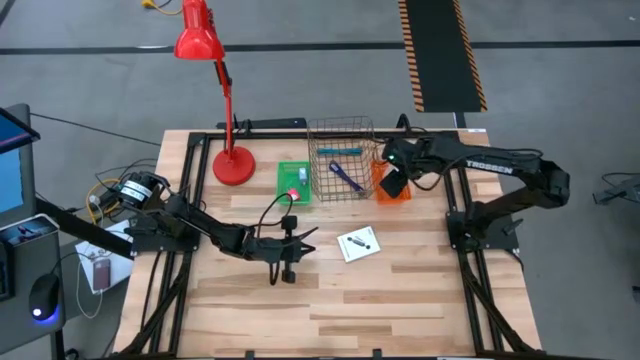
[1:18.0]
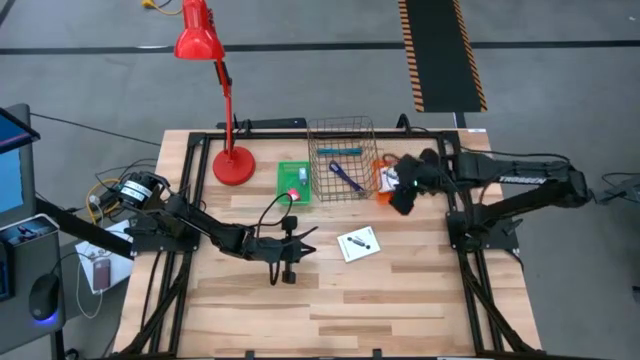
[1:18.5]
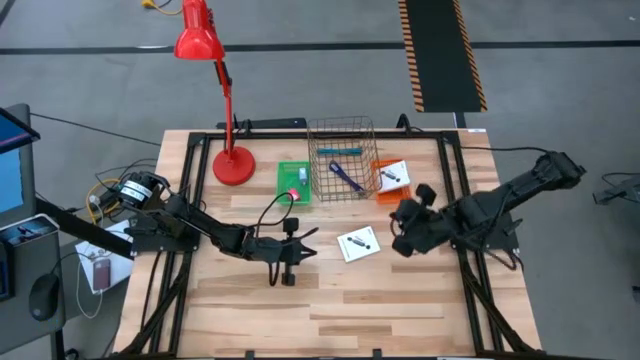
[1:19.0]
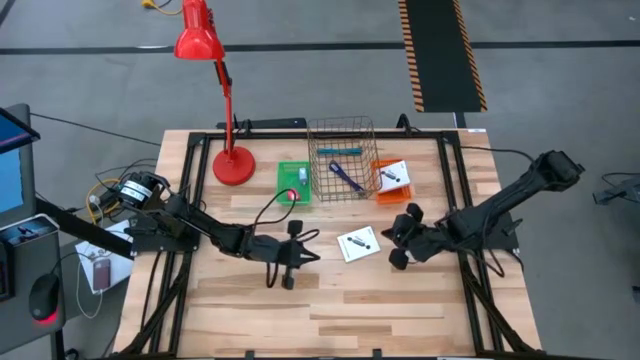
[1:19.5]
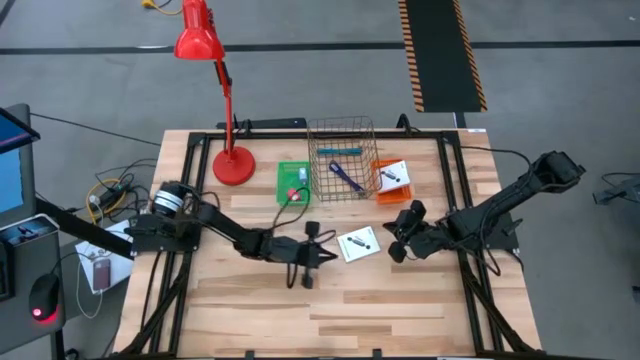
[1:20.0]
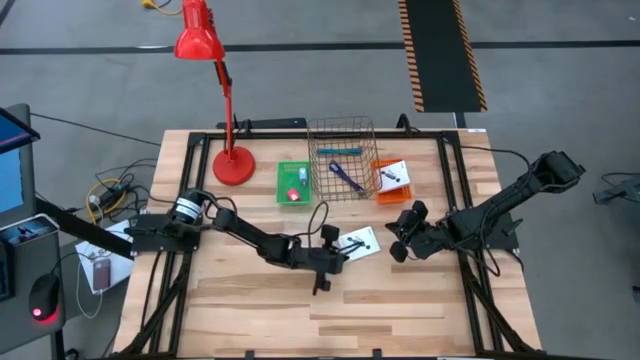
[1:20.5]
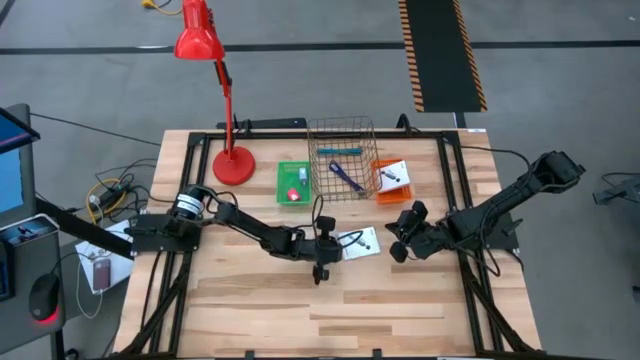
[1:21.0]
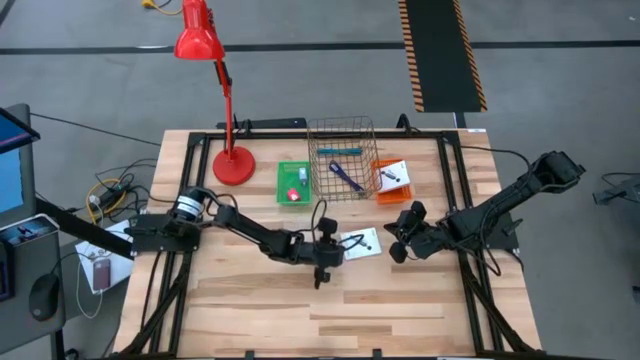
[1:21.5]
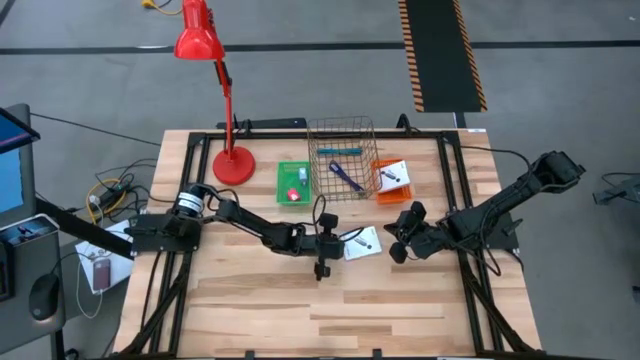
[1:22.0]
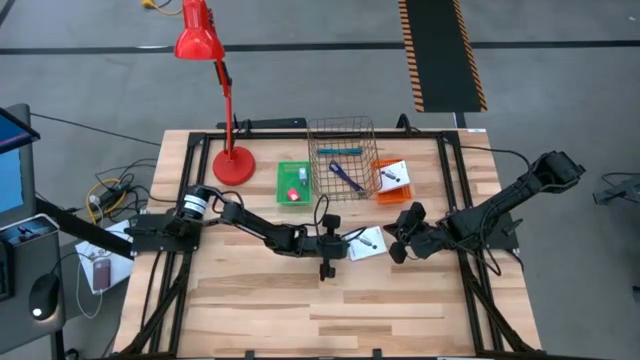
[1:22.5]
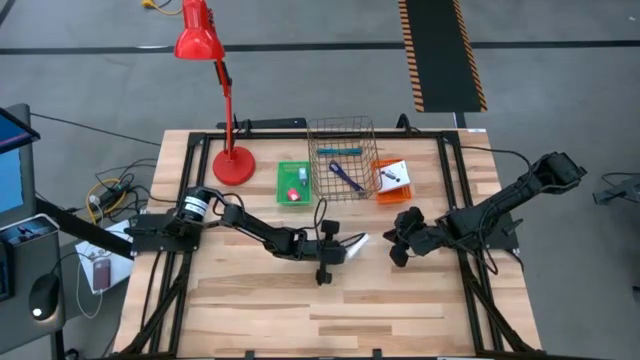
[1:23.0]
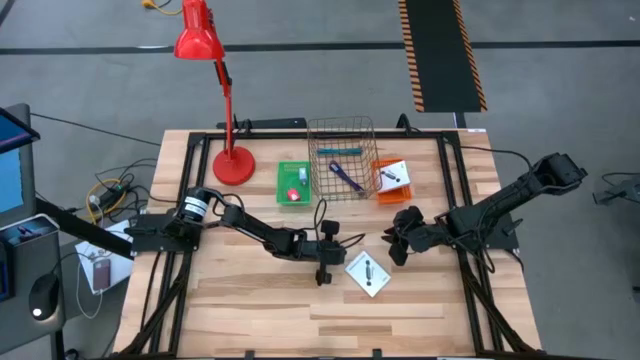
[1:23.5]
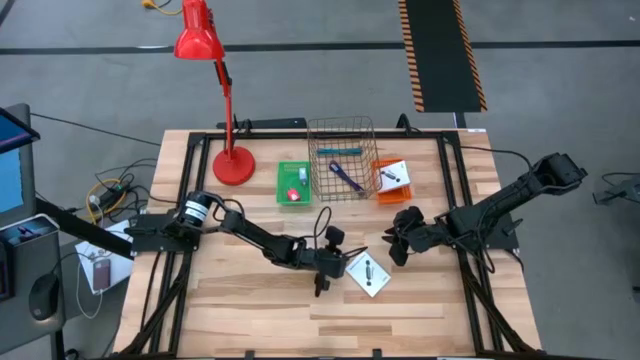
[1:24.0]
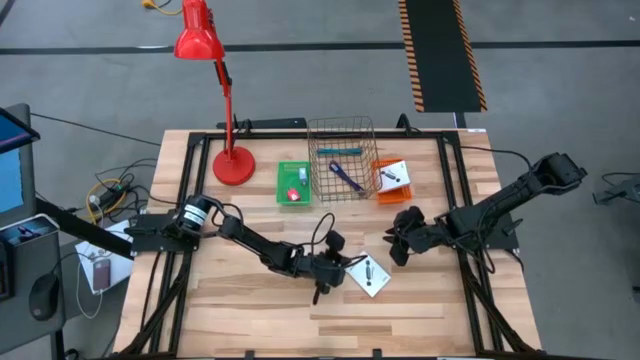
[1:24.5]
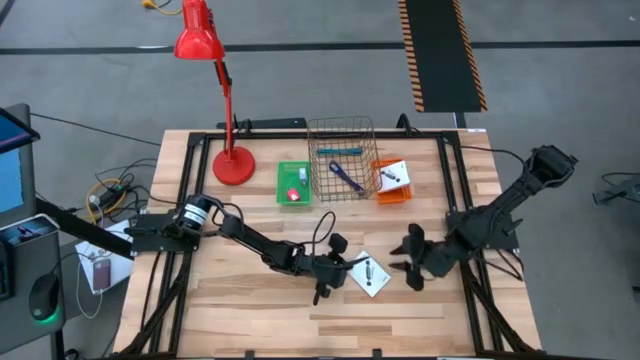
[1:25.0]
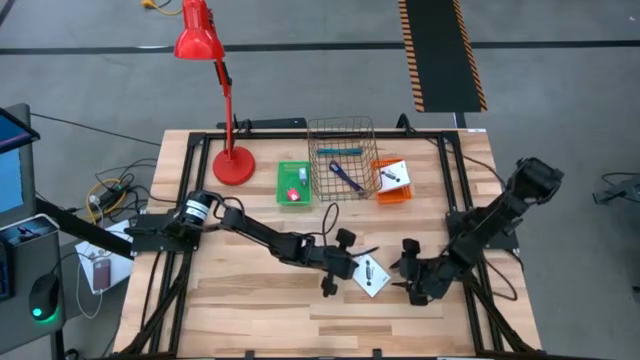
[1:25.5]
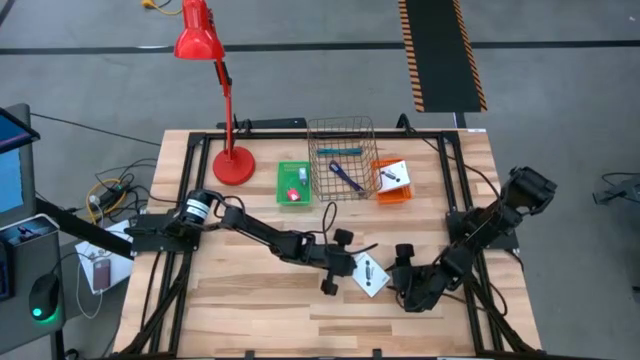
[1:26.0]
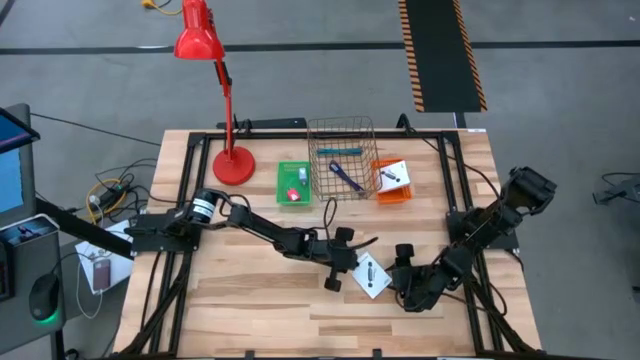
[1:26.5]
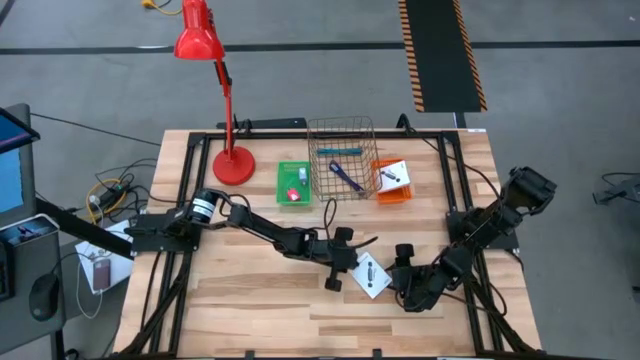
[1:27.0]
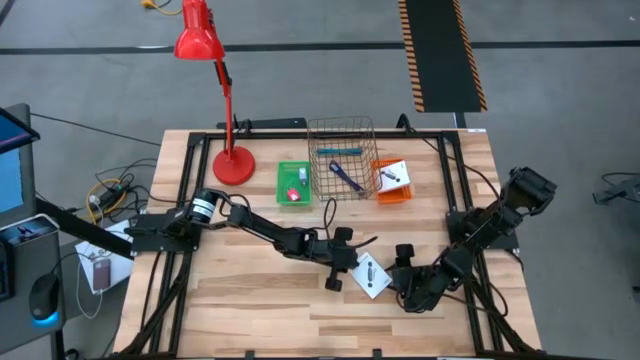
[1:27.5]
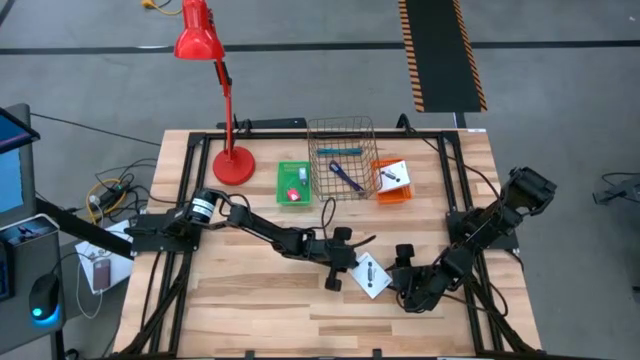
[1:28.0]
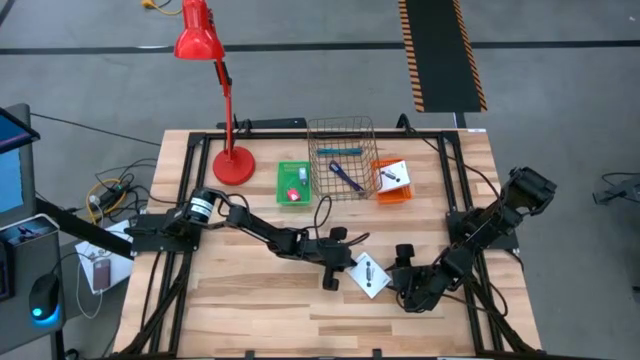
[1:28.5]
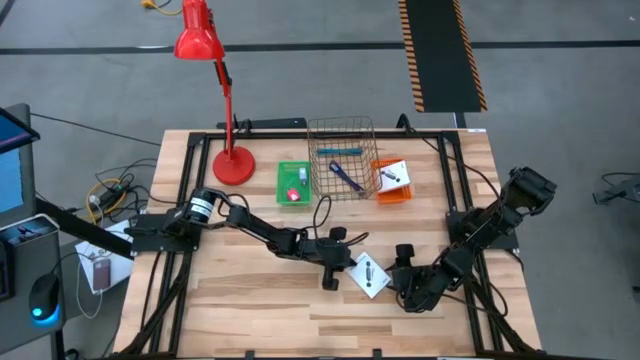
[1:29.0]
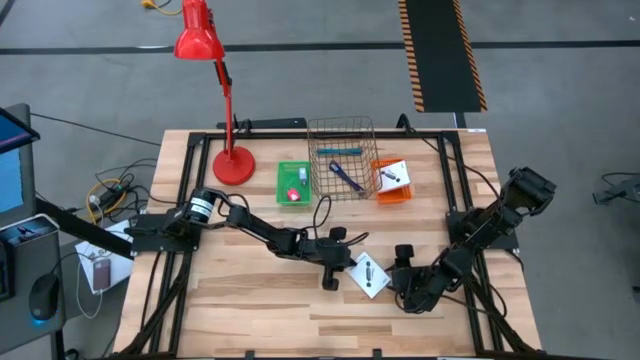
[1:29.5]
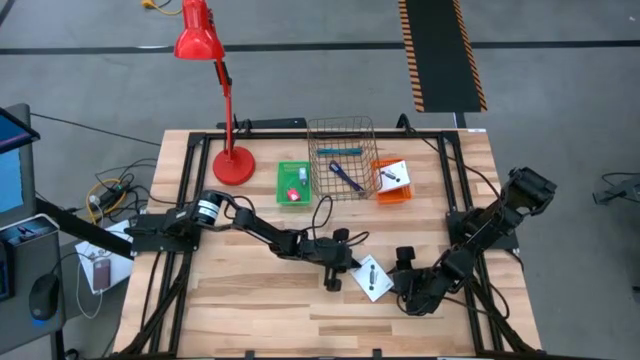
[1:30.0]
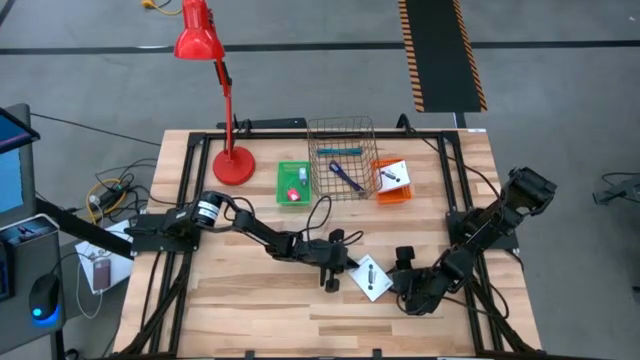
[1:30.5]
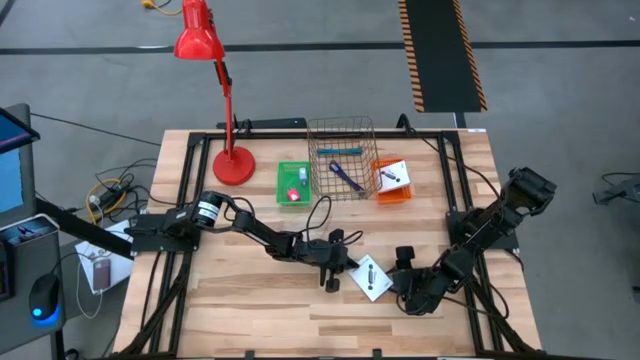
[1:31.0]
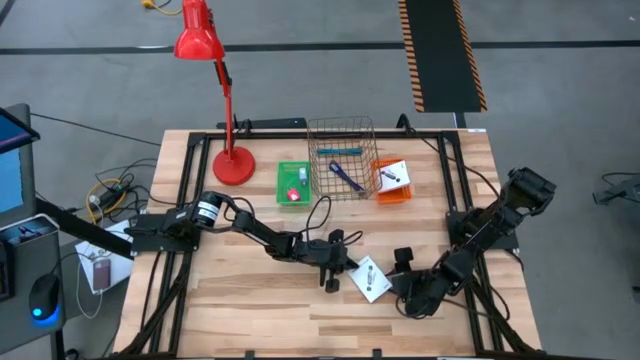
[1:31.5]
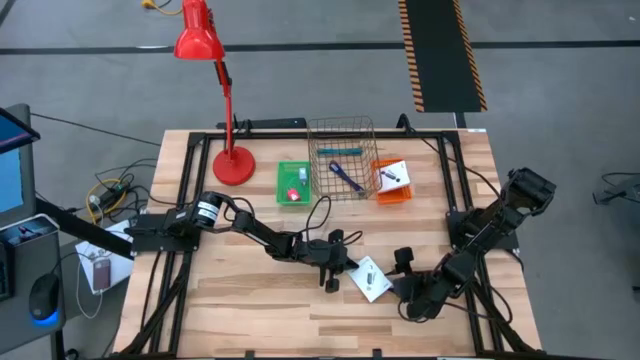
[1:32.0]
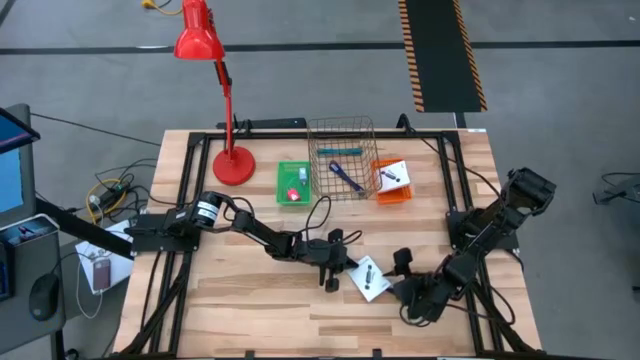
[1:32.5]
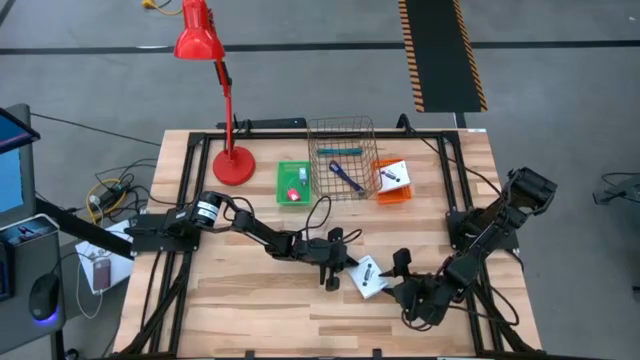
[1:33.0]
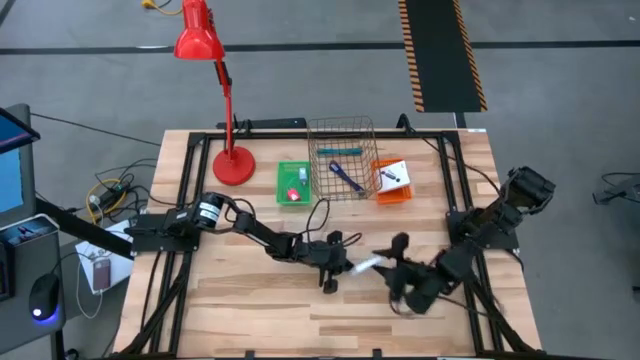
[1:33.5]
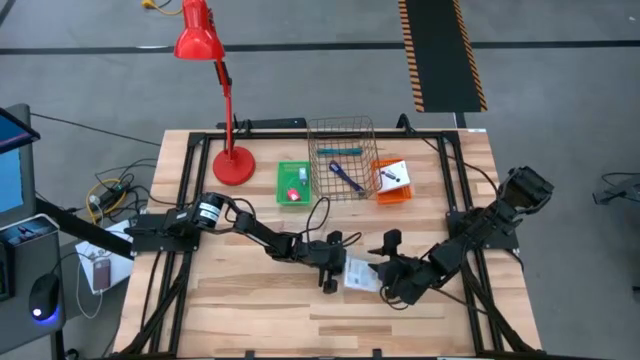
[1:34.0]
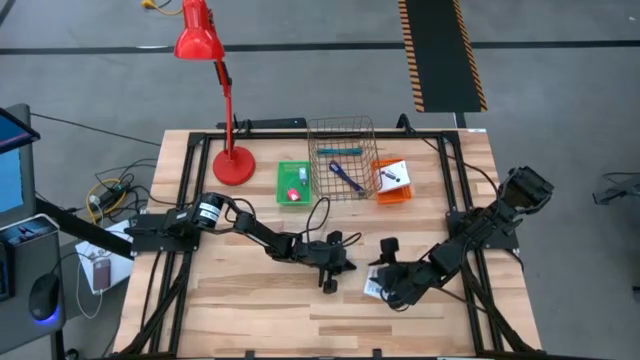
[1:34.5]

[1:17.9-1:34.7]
Task: Pick and place items into bin
Put the white box into the orange bin

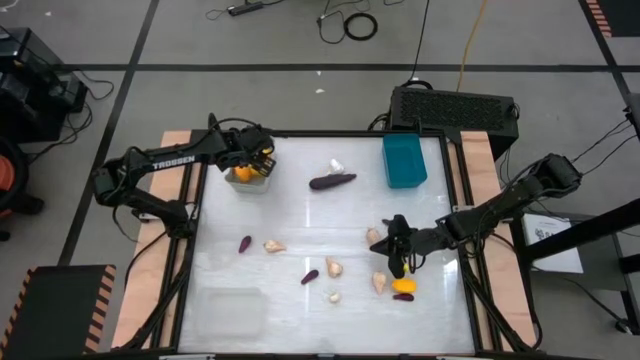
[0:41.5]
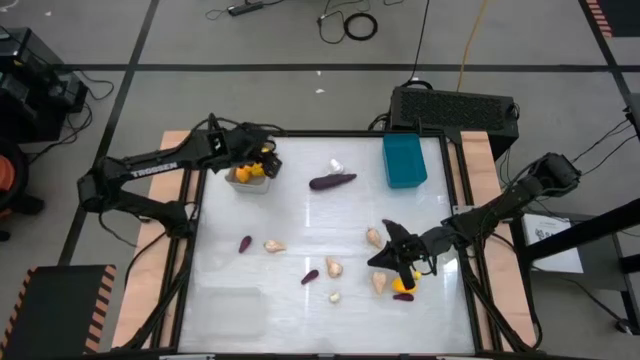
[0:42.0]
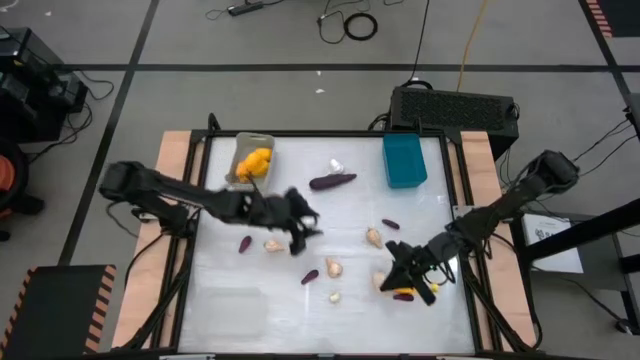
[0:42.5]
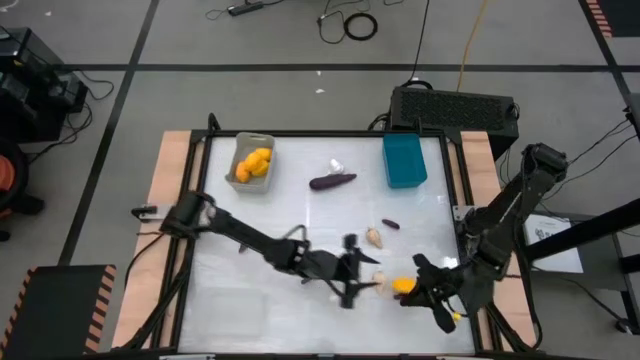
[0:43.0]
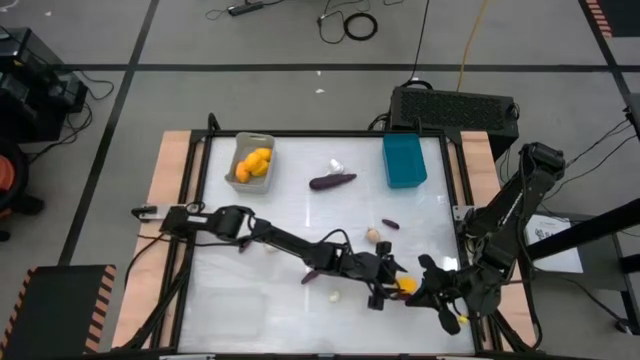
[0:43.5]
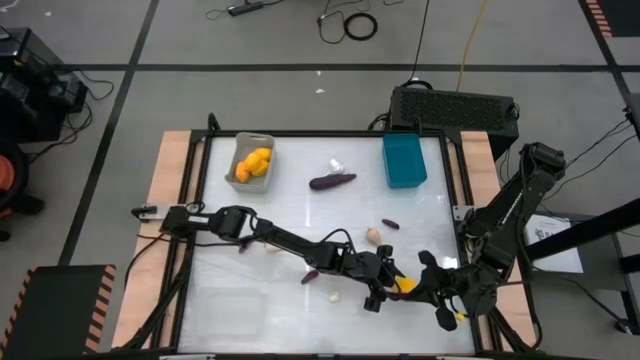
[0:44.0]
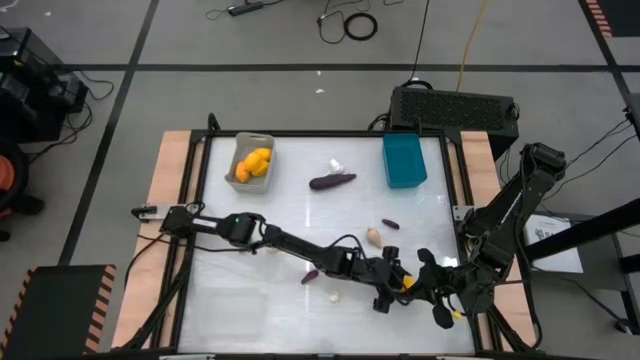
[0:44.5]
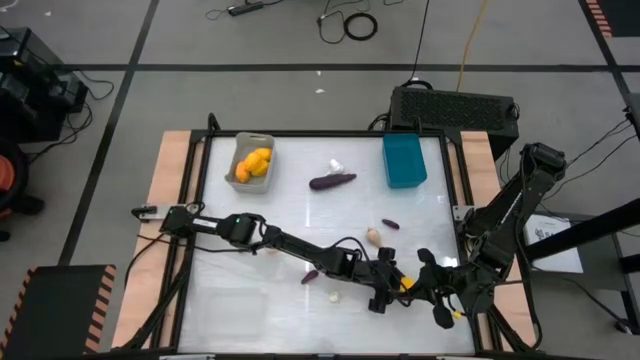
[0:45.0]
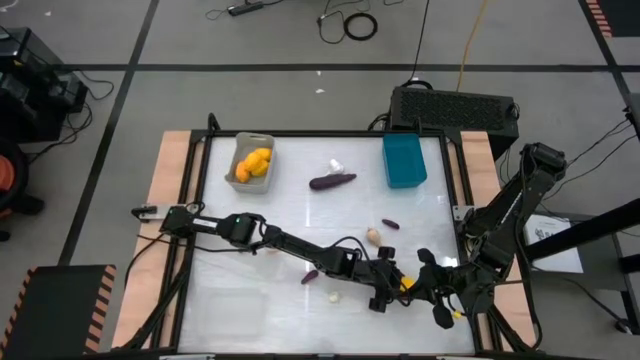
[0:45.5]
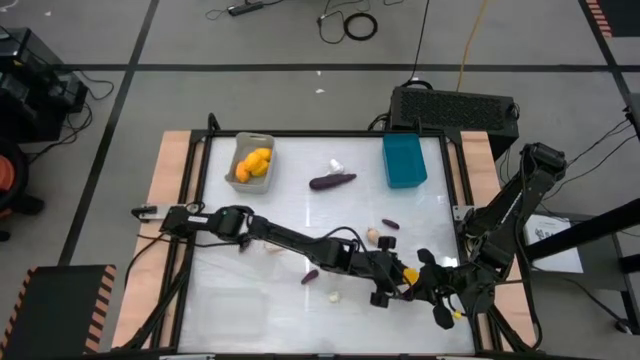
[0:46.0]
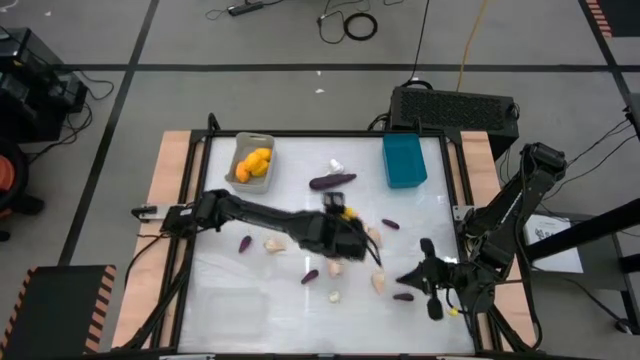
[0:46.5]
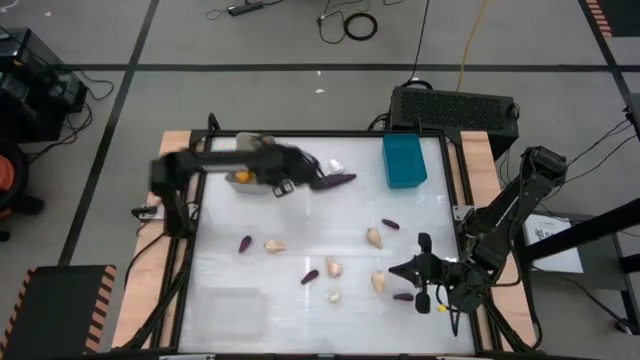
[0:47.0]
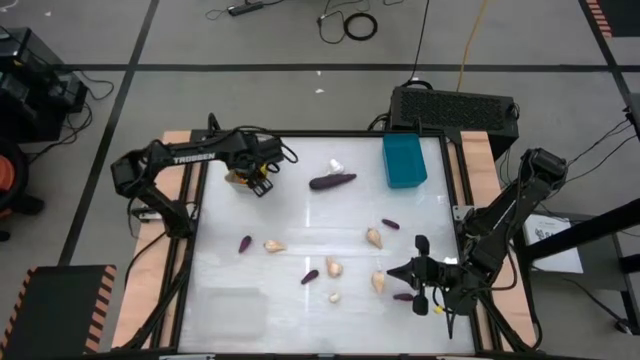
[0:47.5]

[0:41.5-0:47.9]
Task: Sort produce into baskets
Put the lemon into the gray bin
